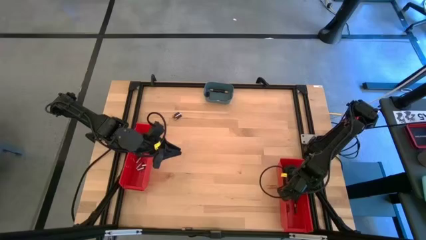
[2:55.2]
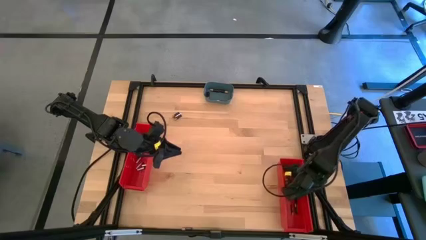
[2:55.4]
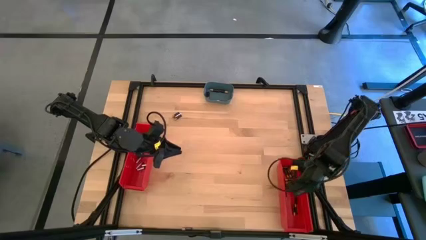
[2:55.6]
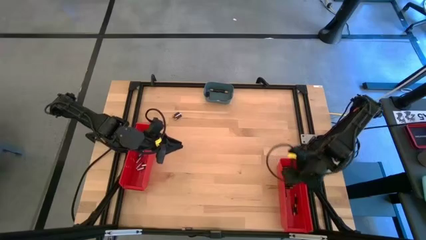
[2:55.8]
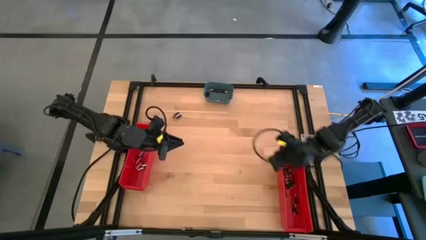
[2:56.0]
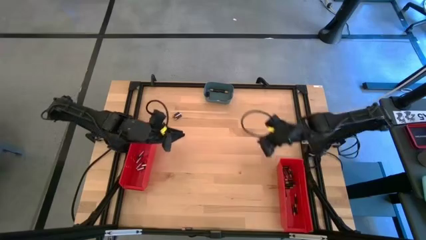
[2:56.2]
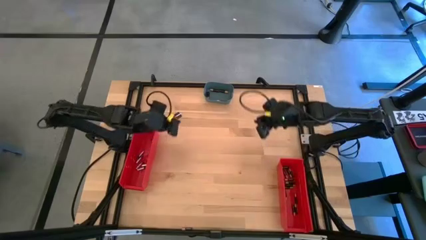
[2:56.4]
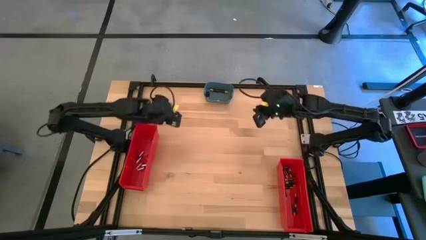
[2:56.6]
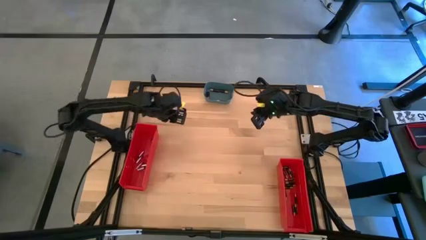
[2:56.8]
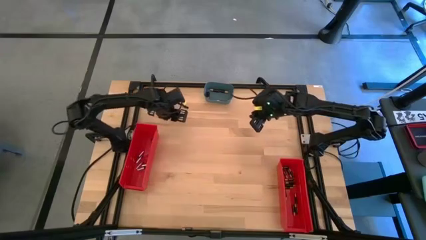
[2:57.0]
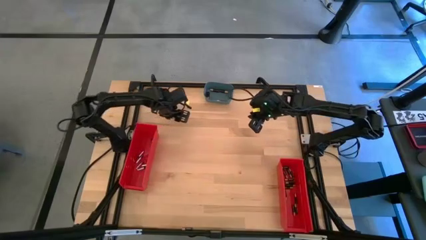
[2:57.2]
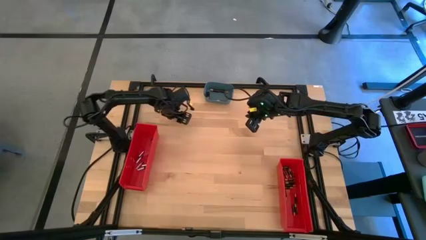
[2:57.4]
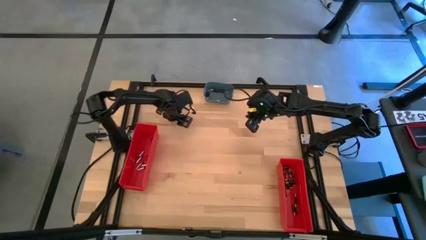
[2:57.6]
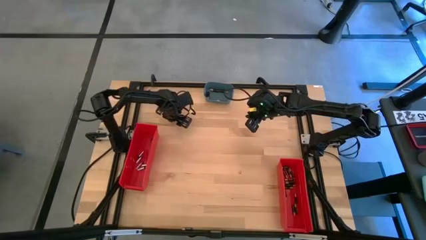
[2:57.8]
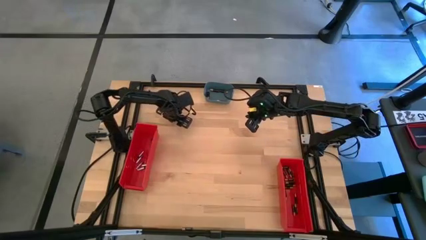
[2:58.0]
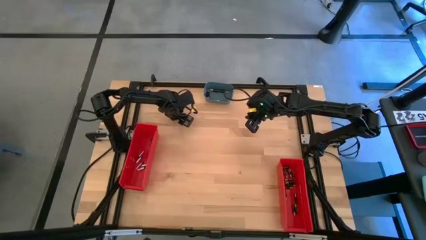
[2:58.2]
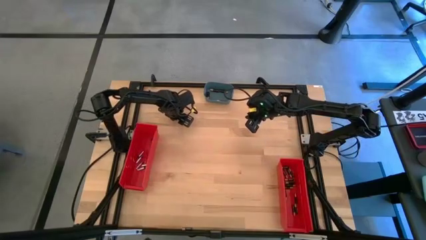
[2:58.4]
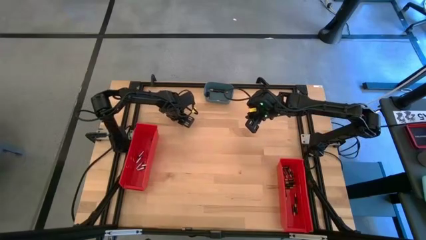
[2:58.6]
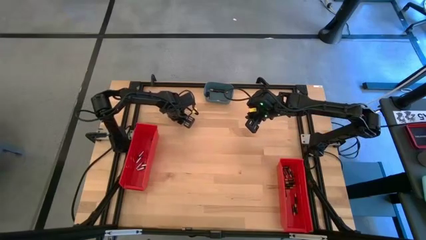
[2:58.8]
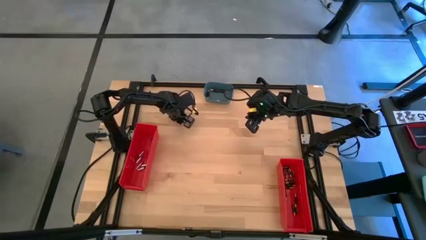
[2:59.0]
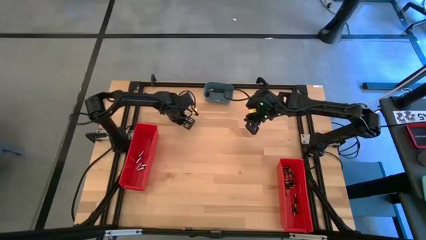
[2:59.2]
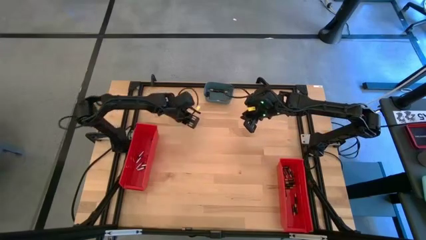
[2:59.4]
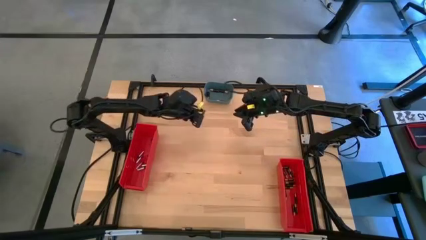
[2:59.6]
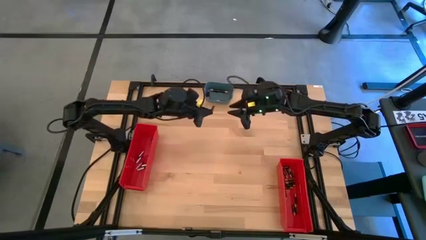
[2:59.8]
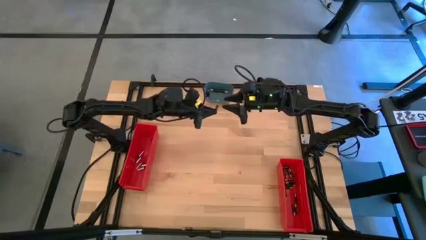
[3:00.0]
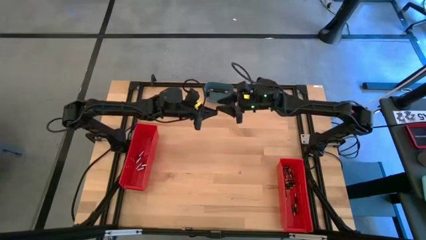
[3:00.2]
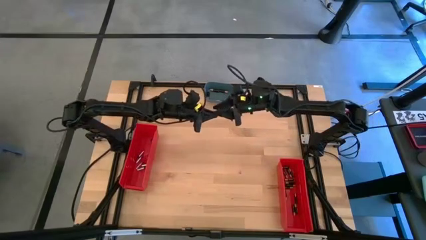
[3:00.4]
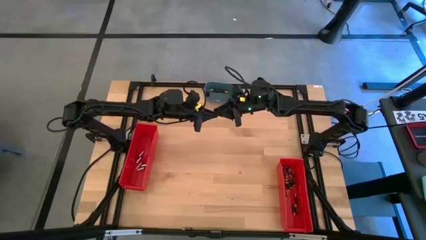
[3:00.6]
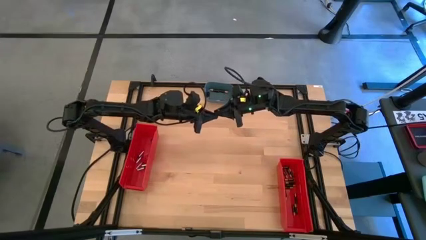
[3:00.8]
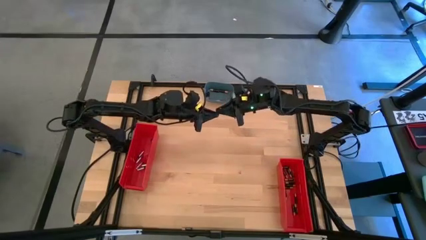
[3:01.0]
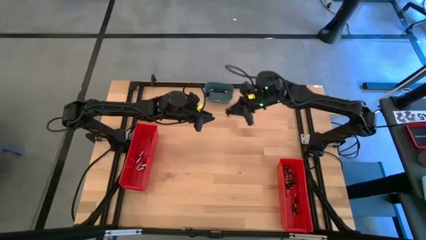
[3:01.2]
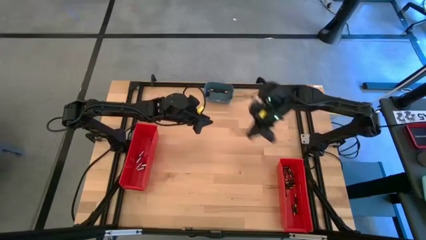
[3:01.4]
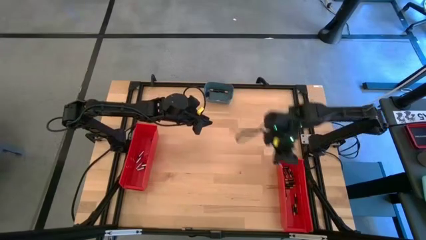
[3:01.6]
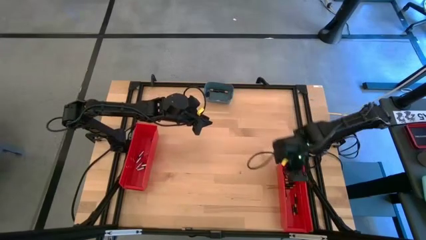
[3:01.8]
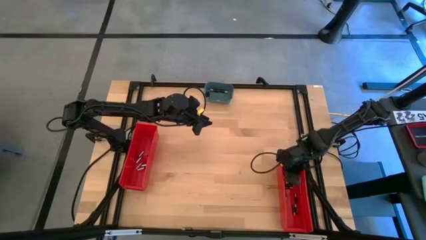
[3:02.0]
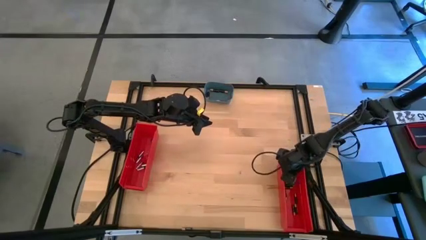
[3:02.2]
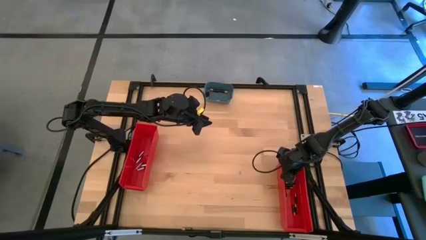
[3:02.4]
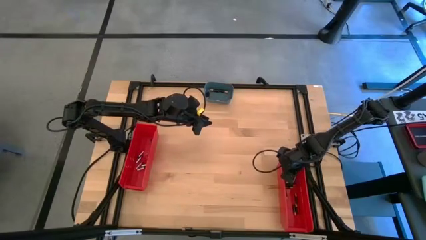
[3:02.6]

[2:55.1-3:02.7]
Task: Sort batteries
Put the small brown battery into the right red bin

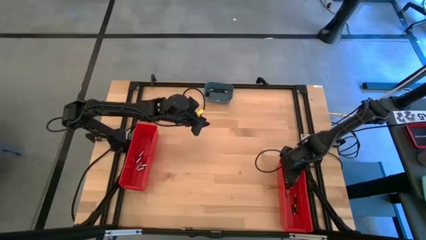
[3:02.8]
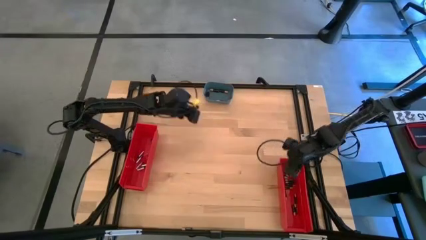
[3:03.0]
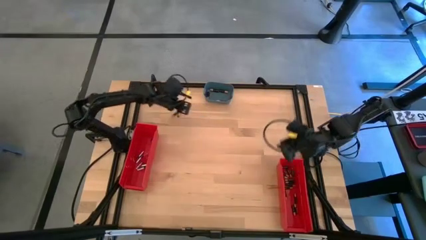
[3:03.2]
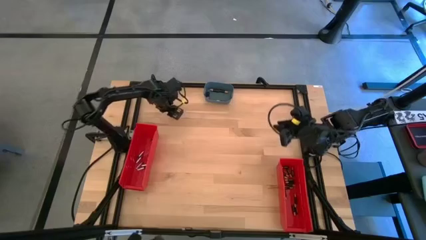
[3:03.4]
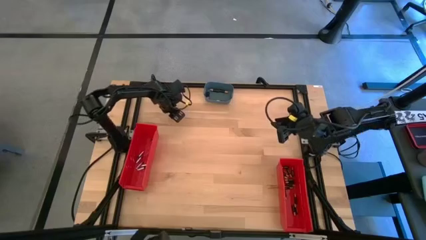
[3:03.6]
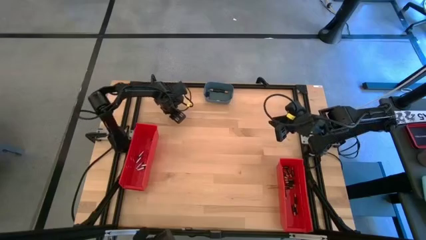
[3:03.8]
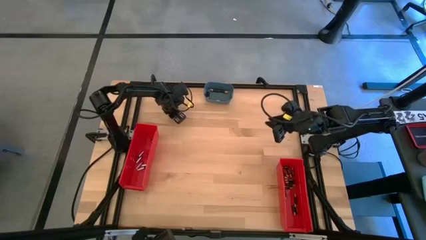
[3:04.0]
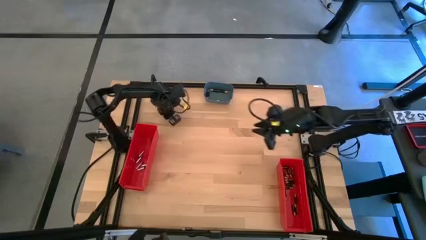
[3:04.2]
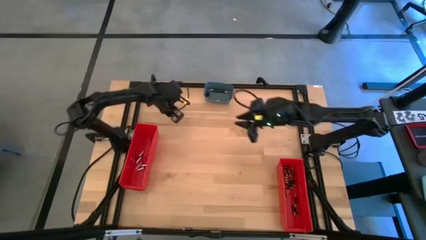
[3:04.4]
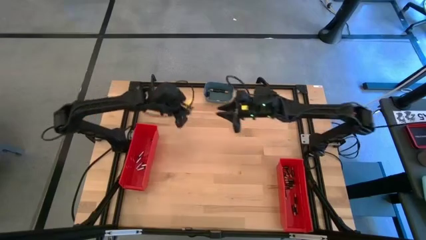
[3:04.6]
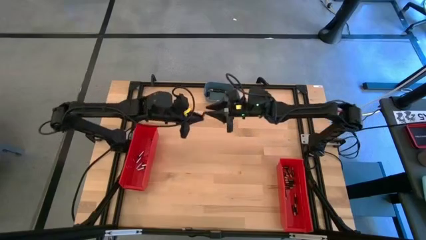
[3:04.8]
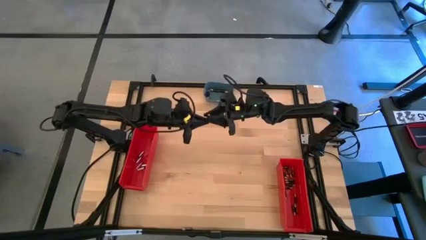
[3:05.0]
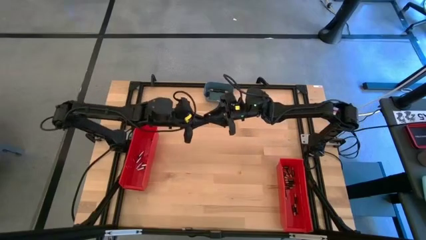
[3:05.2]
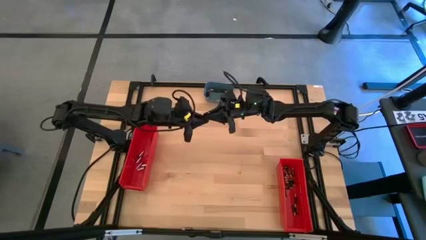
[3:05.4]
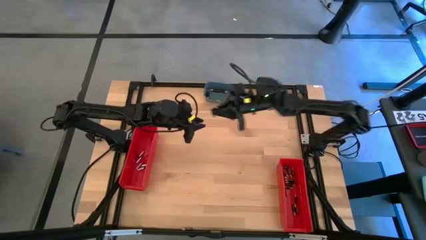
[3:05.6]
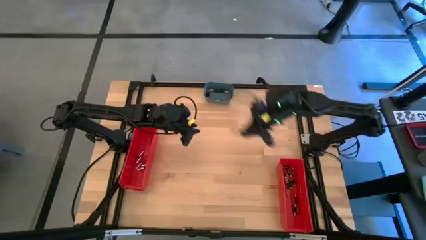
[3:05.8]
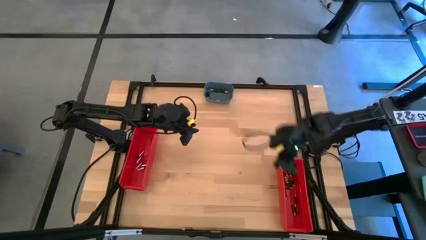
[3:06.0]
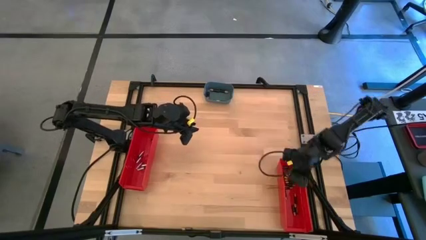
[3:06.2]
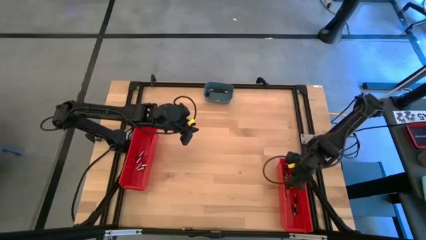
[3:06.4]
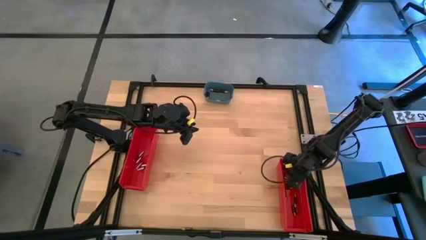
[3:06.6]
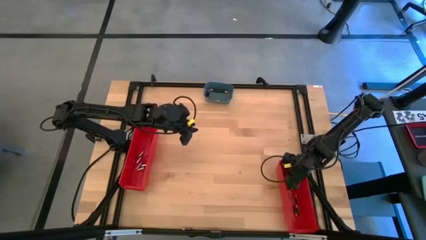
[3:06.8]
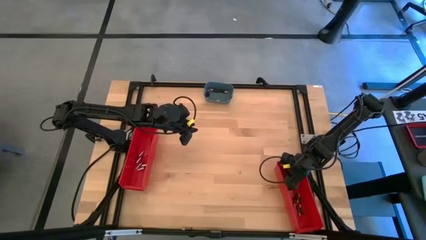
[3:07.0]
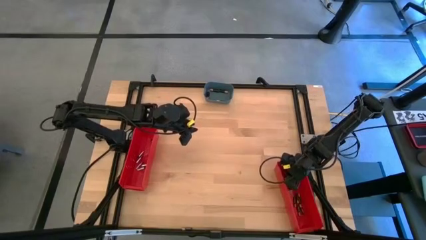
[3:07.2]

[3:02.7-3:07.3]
Put the small brown battery into the right red bin

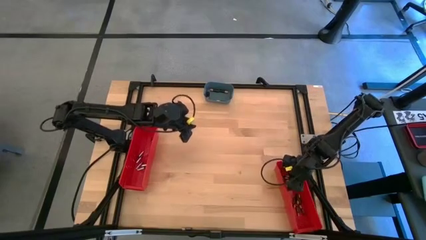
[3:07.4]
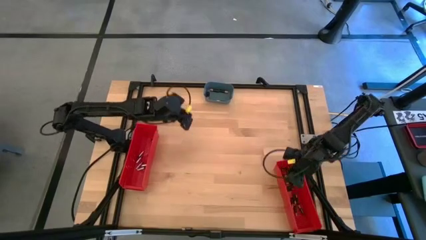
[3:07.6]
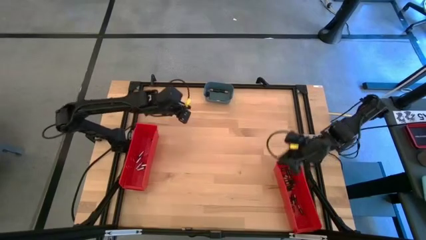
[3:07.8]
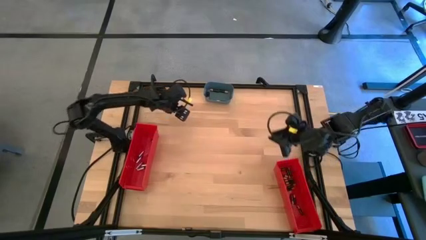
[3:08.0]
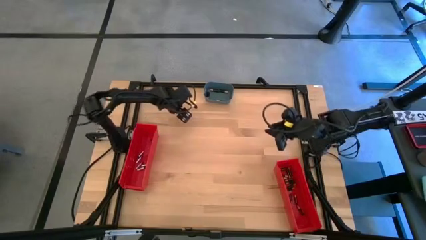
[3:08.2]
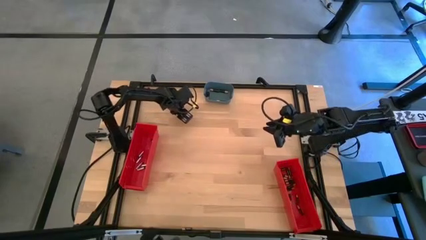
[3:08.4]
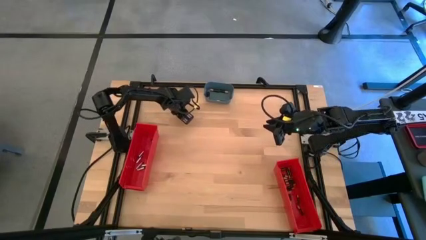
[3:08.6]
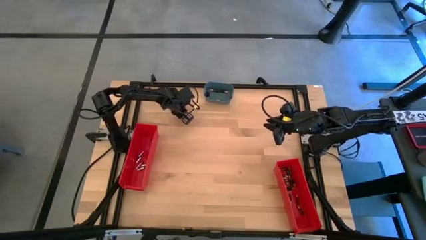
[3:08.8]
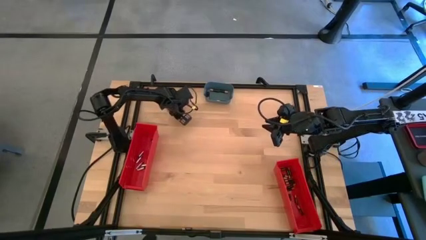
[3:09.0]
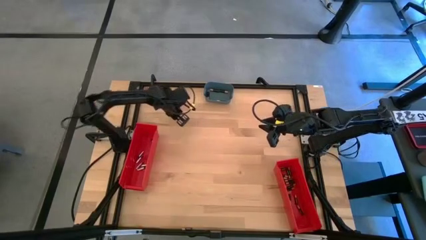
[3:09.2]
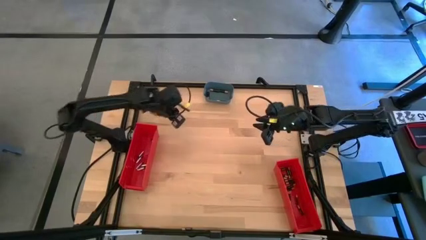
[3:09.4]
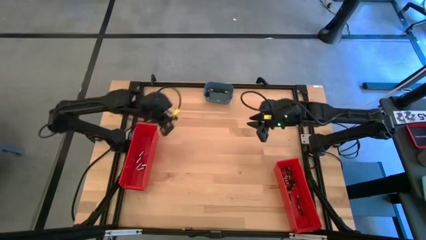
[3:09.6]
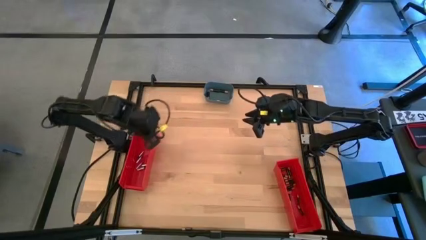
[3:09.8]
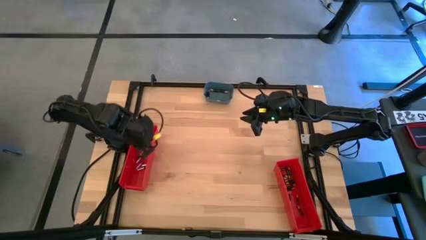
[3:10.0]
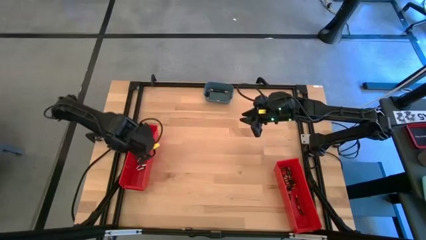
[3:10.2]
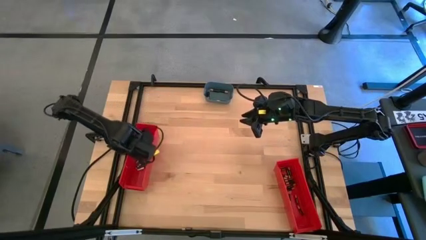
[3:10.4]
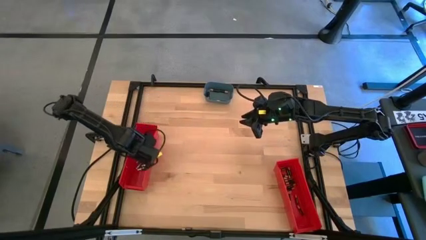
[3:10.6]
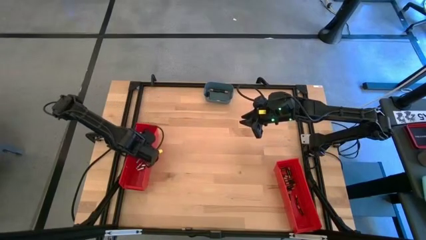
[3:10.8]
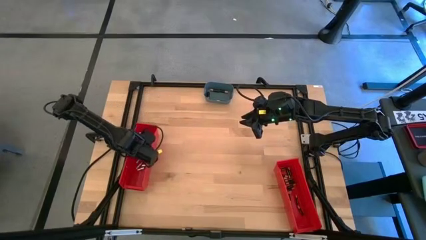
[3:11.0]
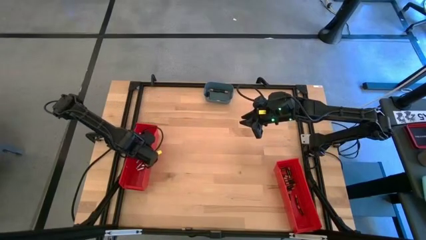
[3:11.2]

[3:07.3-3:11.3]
Put the silver battery into the left red bin
